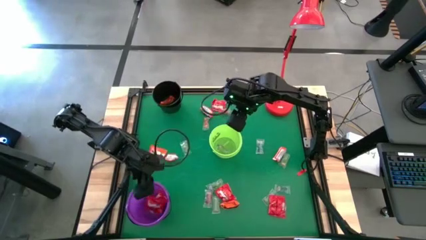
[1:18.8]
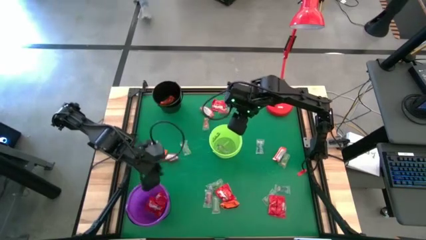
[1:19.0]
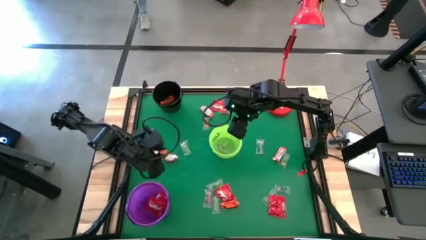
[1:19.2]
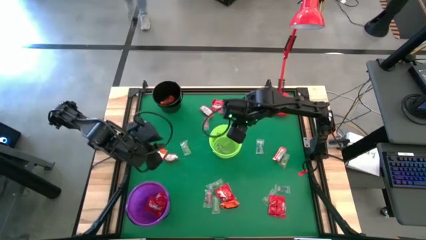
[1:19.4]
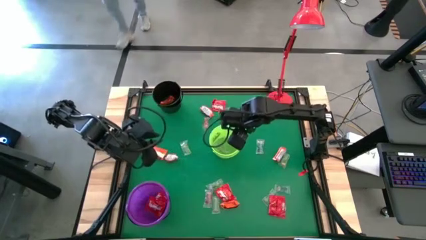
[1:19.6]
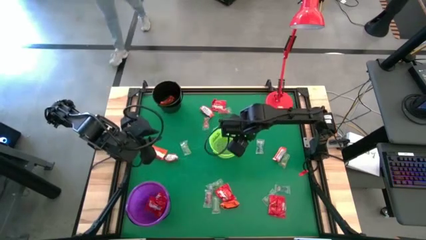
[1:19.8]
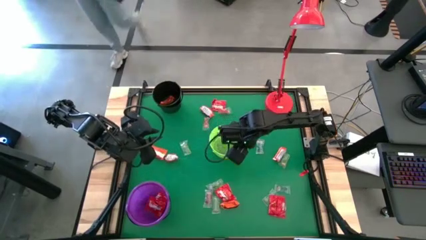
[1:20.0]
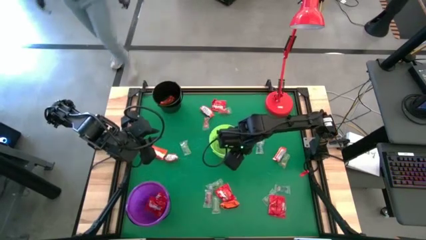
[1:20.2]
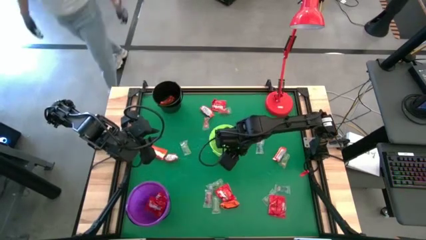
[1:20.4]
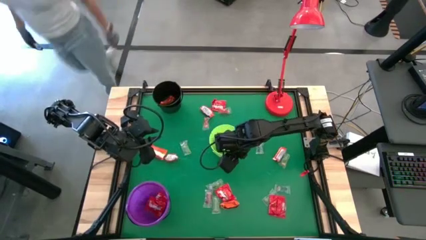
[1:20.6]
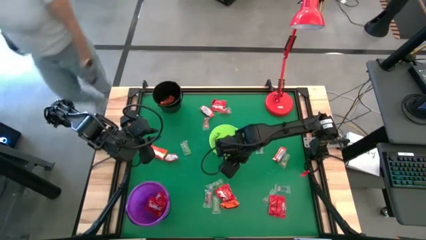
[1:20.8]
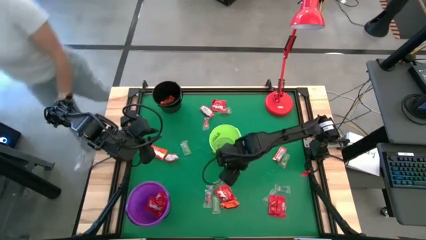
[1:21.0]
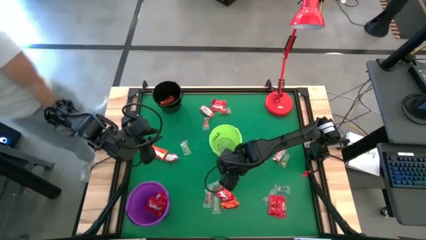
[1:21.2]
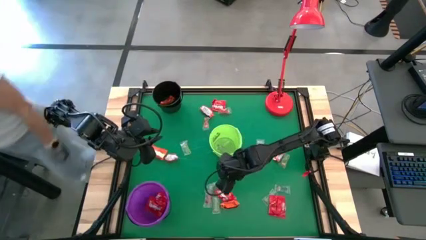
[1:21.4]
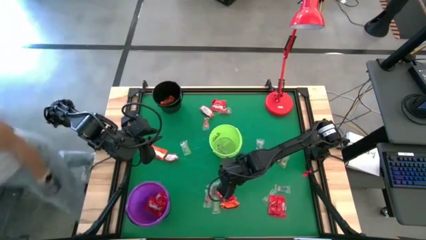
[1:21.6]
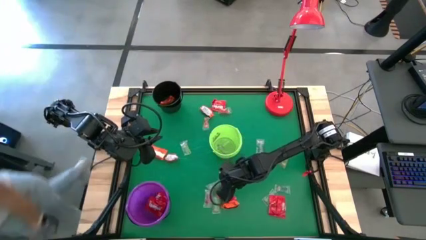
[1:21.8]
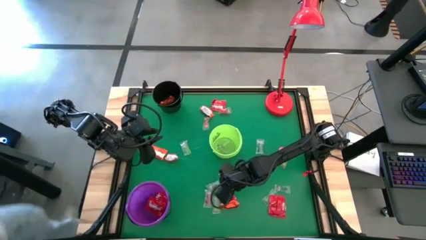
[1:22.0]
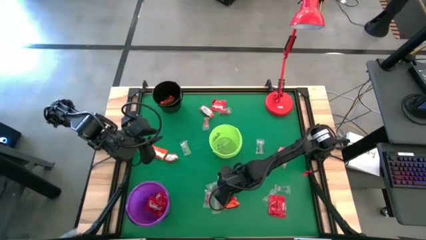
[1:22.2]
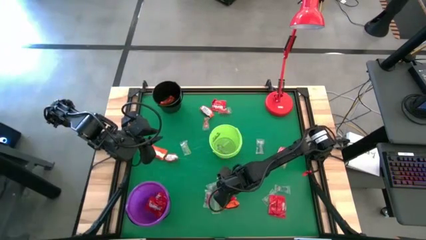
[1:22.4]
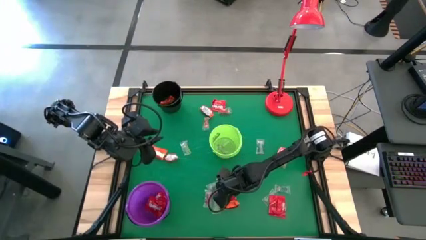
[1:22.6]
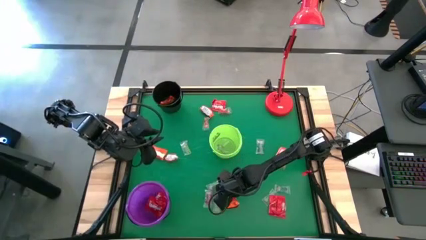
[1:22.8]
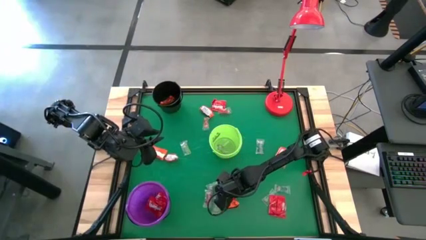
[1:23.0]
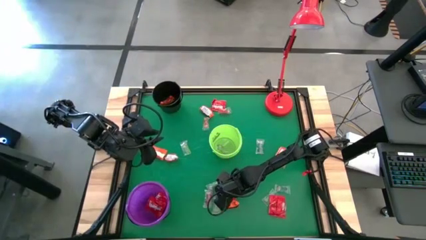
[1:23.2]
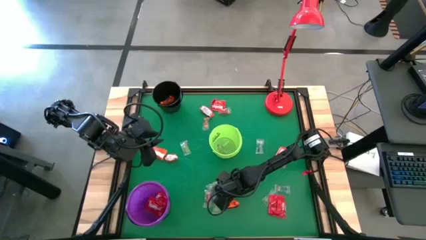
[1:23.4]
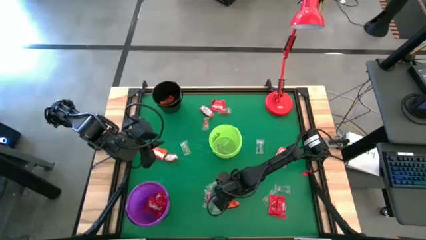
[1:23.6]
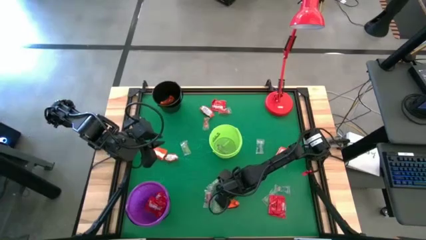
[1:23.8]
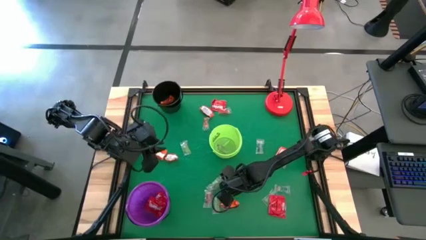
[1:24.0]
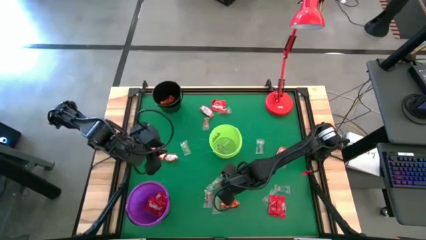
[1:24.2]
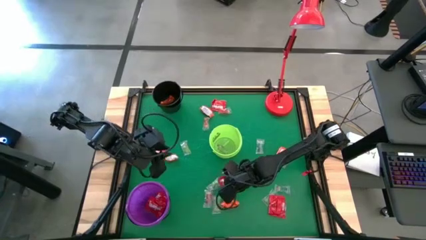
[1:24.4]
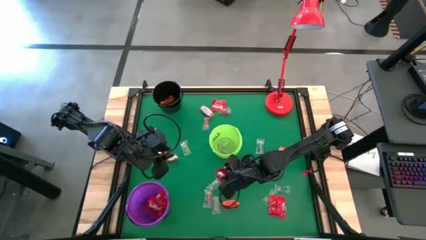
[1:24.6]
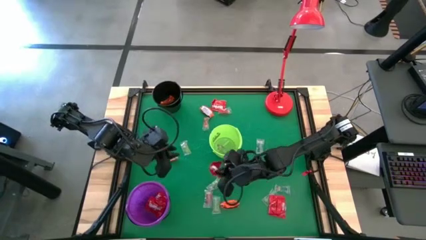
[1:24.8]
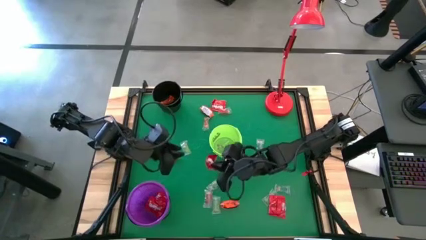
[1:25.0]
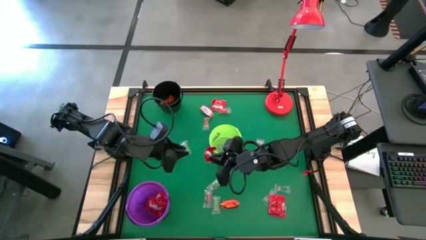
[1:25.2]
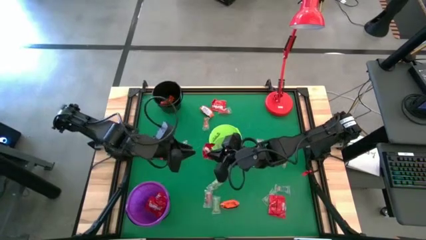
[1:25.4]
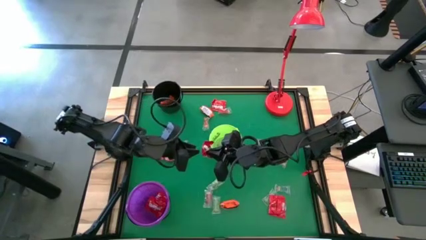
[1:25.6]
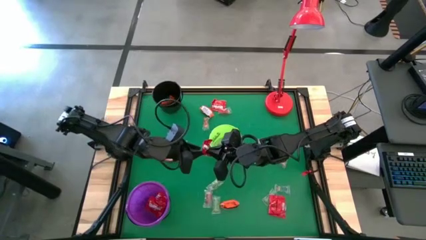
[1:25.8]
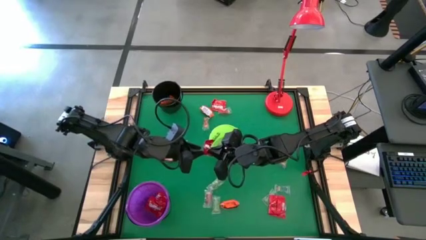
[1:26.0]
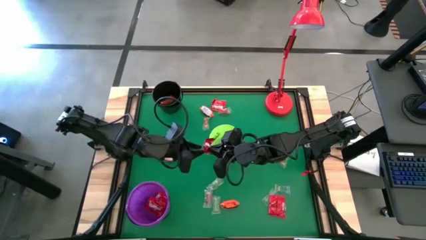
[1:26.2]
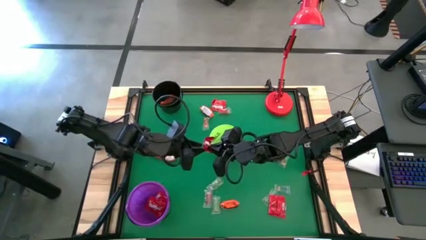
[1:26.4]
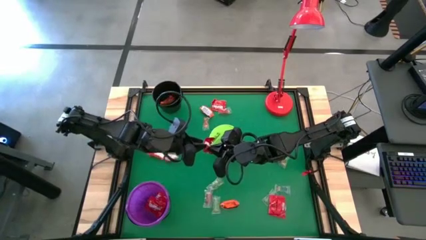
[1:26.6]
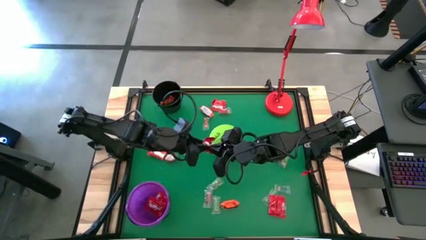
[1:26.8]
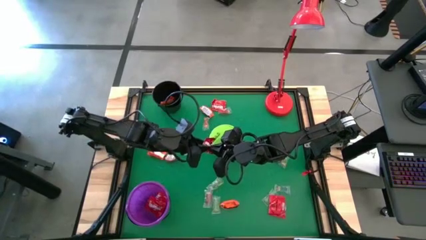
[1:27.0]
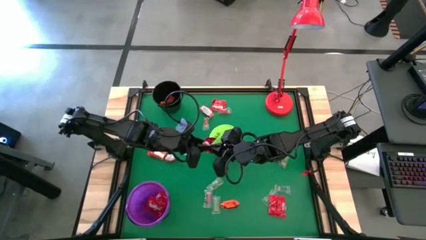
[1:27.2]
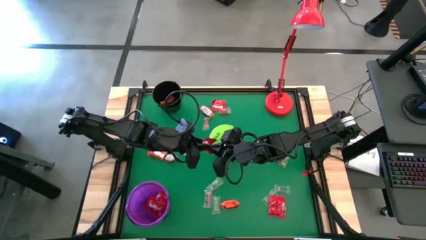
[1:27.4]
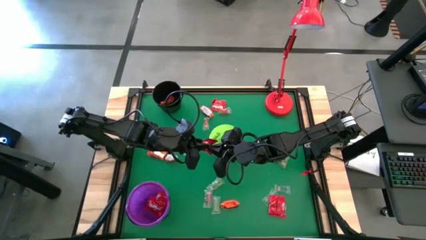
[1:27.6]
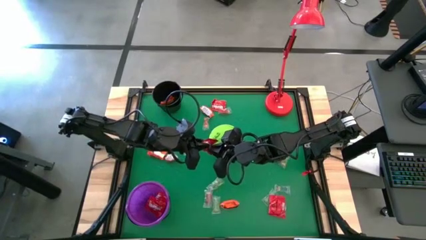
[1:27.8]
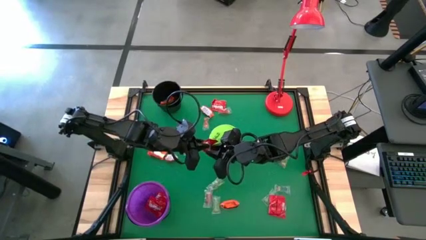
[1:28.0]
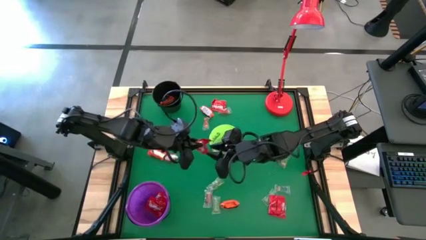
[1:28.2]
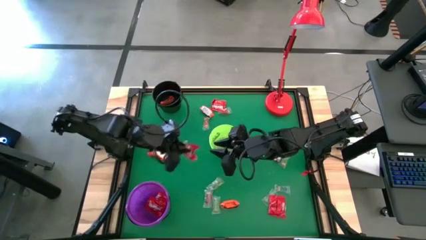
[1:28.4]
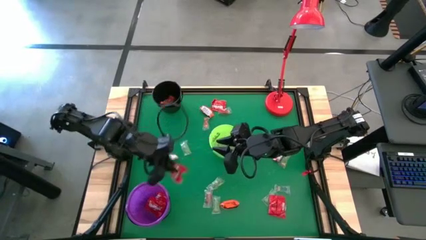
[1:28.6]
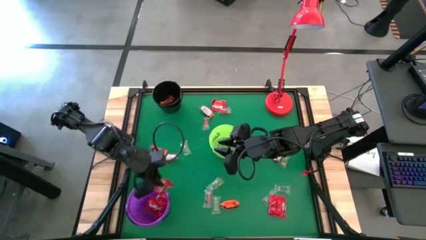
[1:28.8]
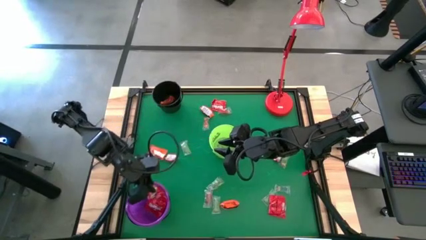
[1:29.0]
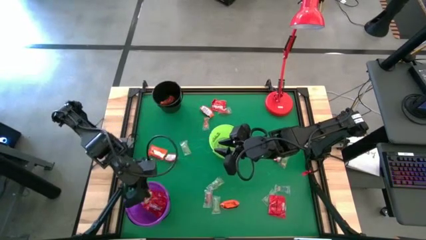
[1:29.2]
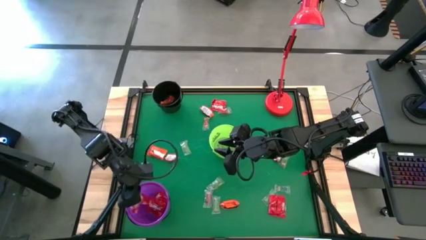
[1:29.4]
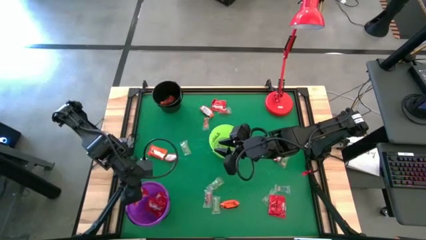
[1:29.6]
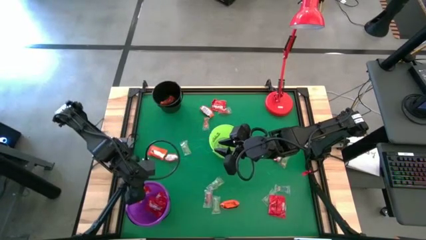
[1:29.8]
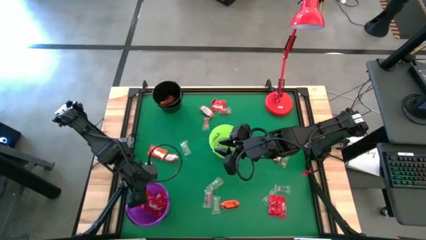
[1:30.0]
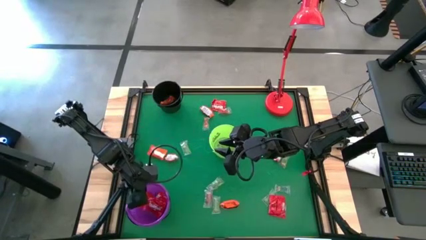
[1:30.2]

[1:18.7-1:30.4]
Task: Sort candy
Put the red candy into the violet bucket

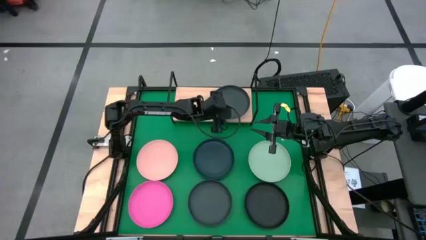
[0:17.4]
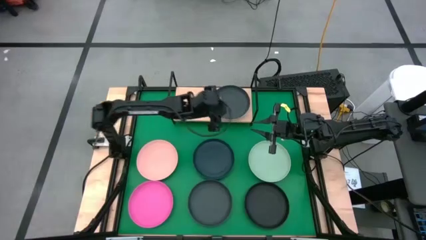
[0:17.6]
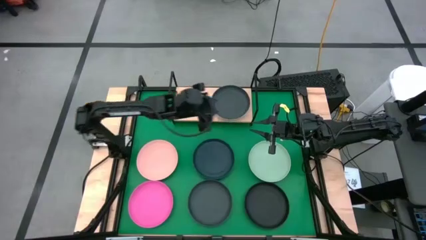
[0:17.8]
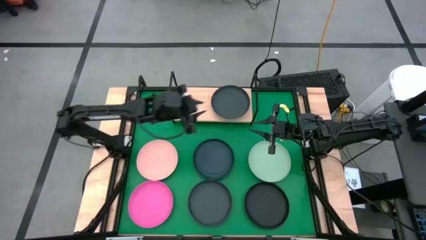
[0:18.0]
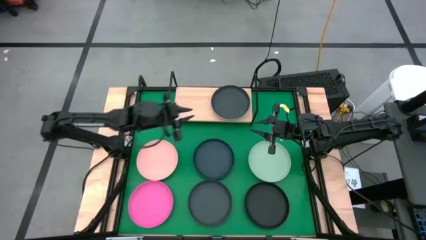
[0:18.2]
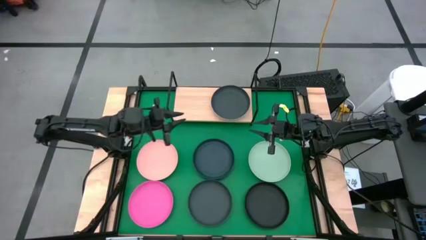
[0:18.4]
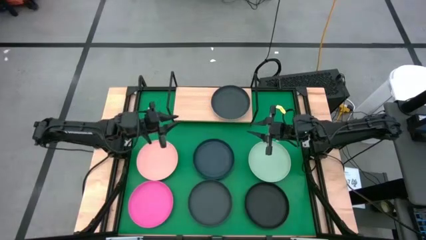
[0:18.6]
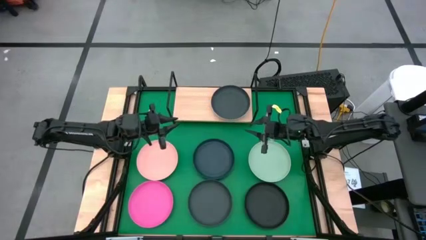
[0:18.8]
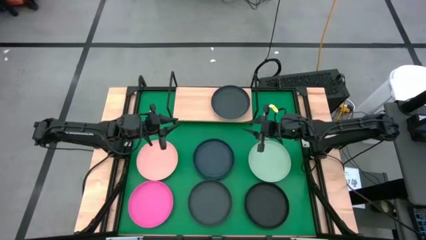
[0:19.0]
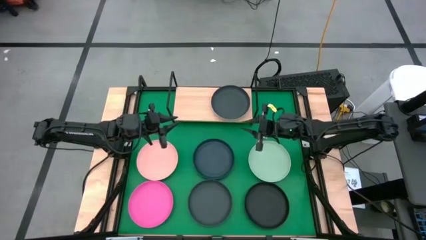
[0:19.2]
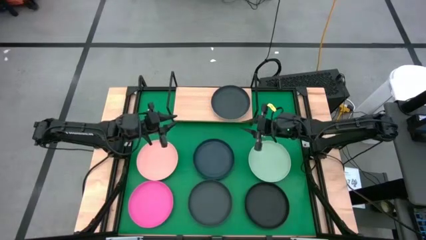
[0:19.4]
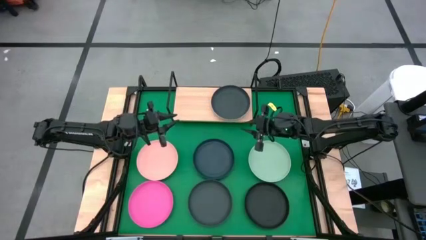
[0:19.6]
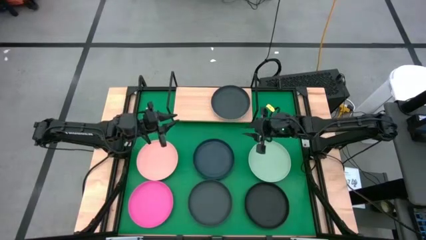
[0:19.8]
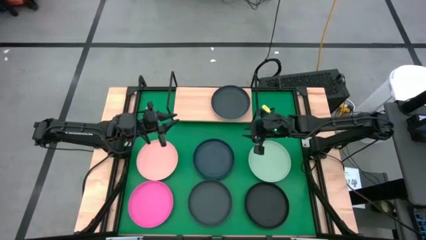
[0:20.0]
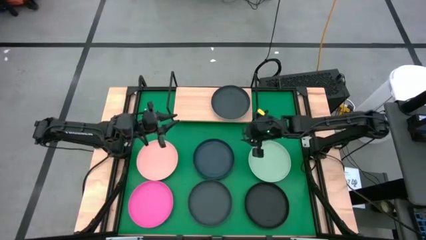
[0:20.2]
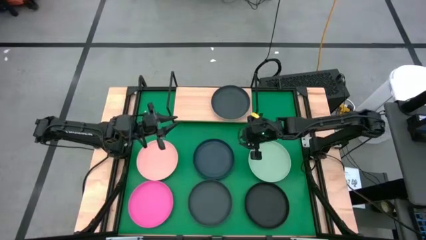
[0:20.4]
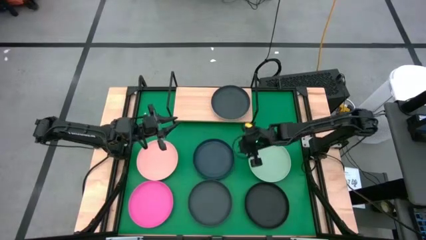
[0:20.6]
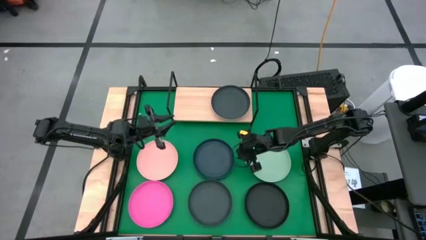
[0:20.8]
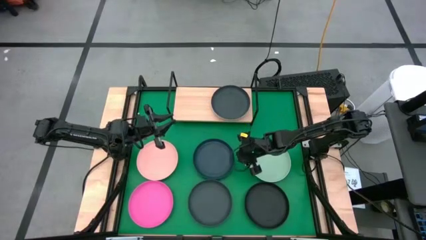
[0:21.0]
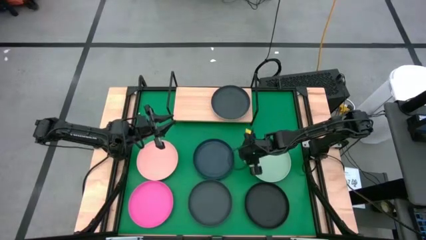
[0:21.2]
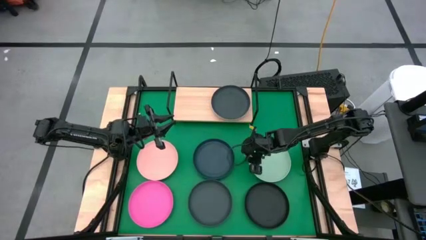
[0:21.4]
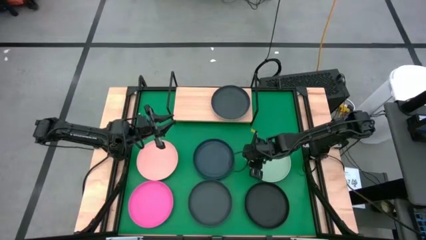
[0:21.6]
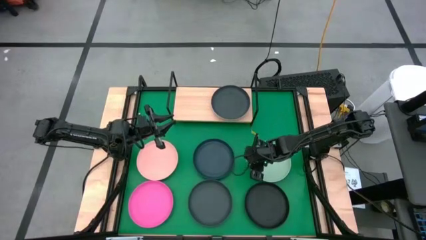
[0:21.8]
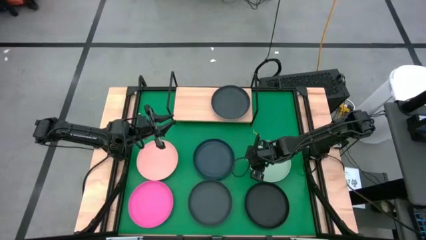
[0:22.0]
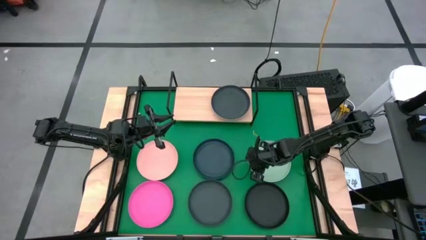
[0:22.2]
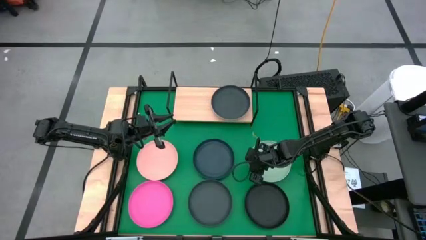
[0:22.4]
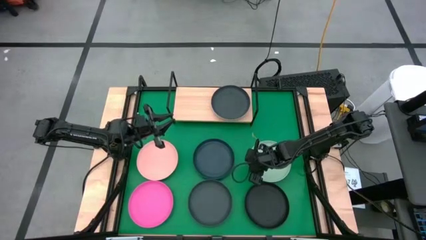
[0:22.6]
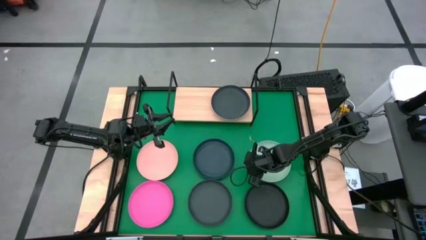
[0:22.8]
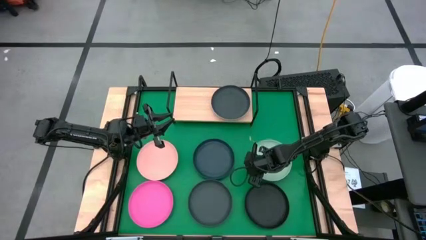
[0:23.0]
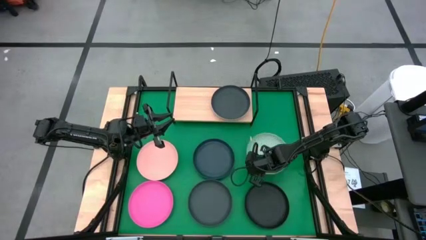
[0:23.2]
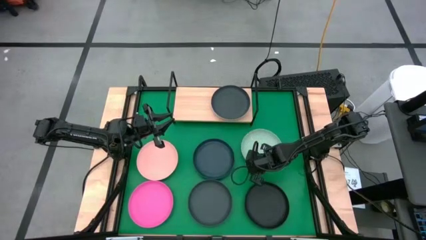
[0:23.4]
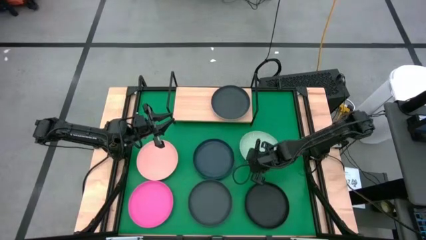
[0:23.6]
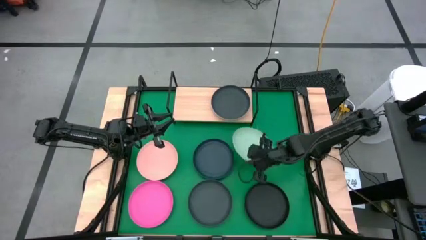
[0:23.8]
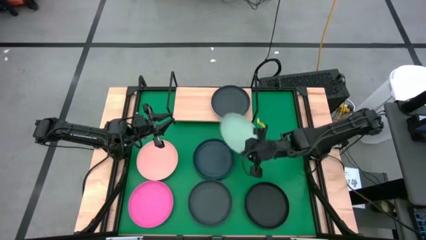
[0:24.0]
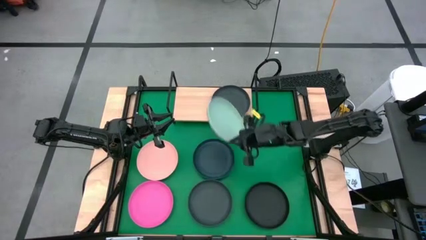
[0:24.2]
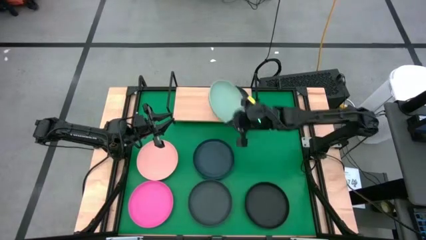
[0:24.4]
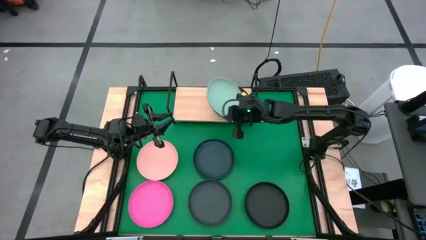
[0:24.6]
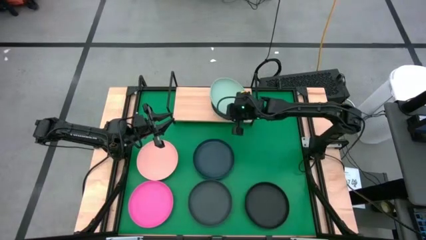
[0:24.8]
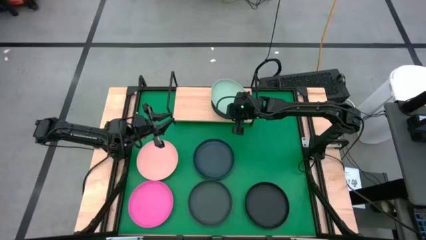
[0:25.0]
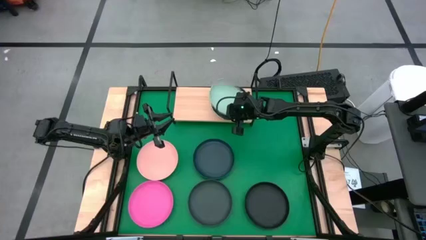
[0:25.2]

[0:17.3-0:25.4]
Task: Place and stack plates onto a shelf
Stack the light green plates on top of the black plate on the shelf
